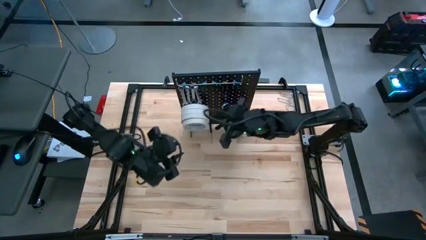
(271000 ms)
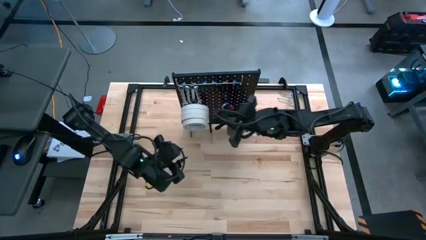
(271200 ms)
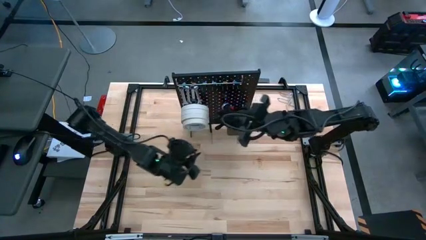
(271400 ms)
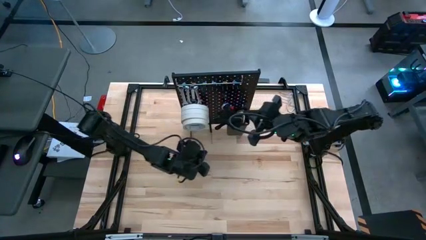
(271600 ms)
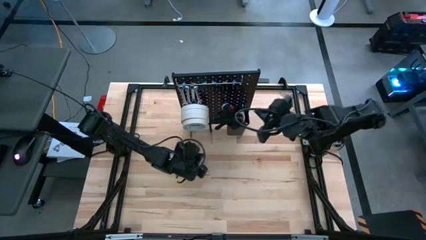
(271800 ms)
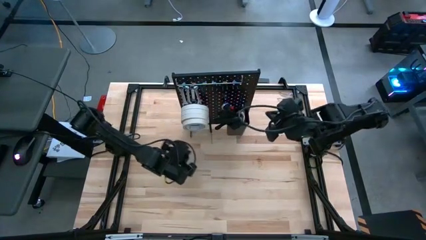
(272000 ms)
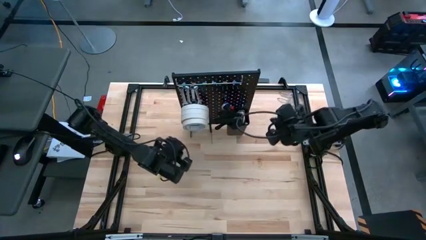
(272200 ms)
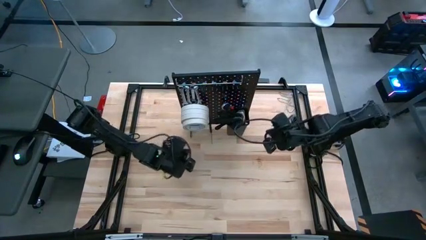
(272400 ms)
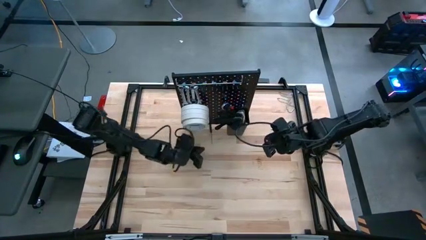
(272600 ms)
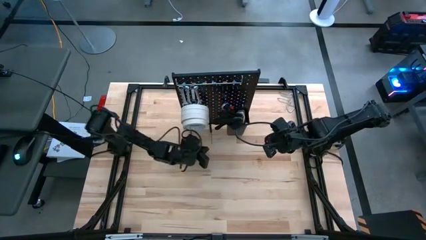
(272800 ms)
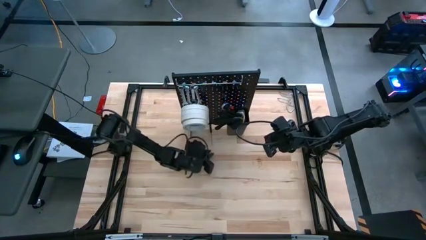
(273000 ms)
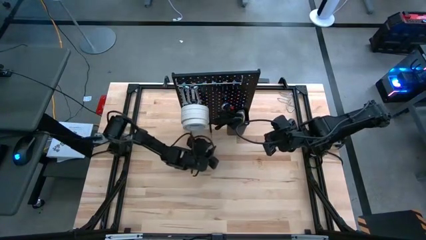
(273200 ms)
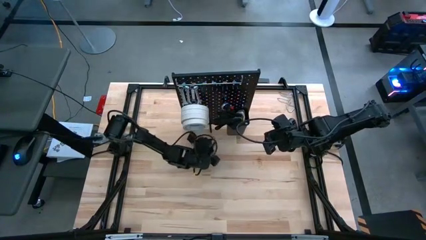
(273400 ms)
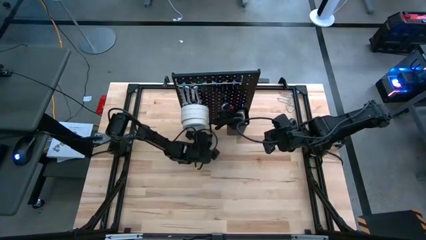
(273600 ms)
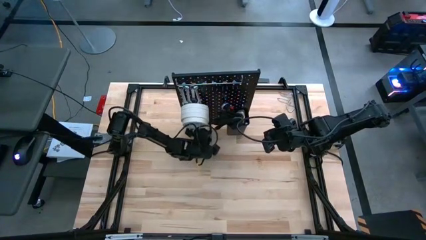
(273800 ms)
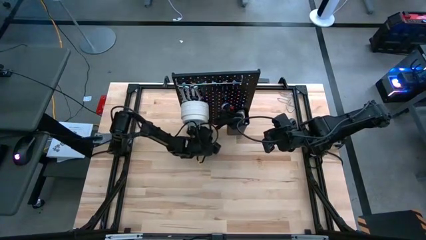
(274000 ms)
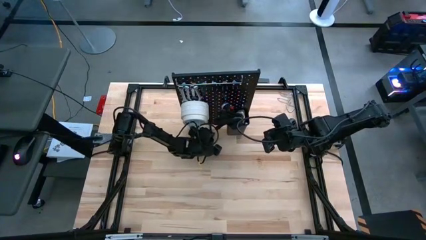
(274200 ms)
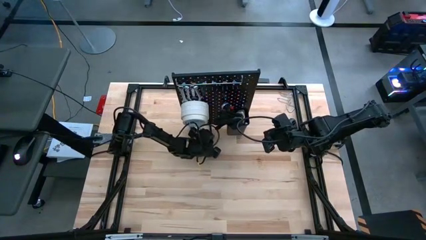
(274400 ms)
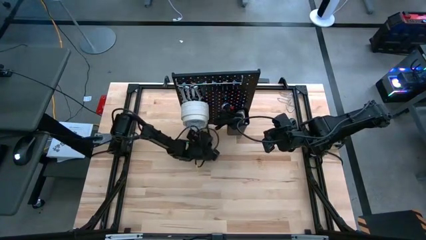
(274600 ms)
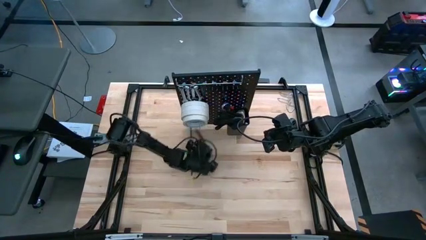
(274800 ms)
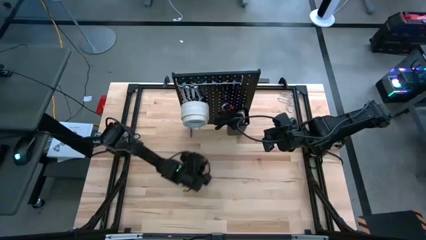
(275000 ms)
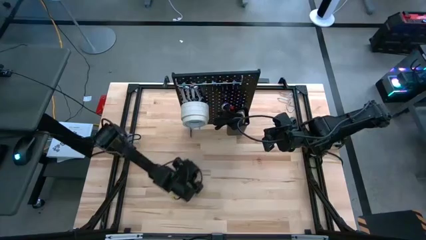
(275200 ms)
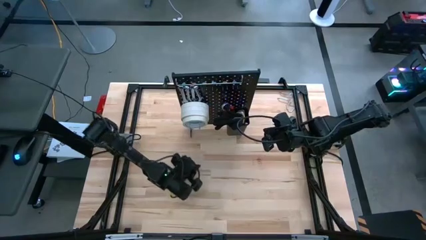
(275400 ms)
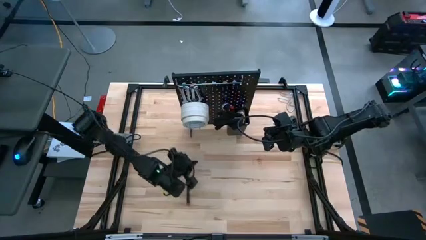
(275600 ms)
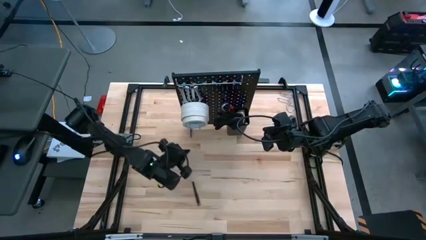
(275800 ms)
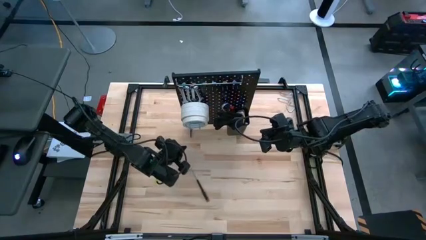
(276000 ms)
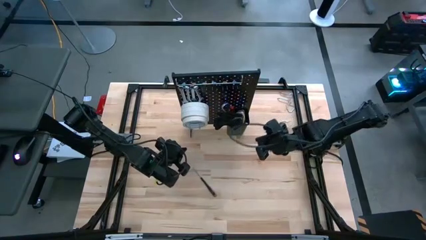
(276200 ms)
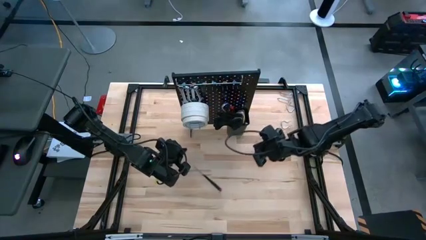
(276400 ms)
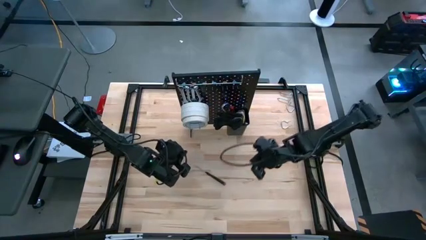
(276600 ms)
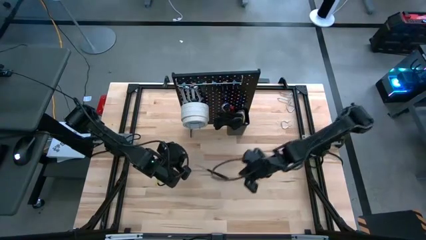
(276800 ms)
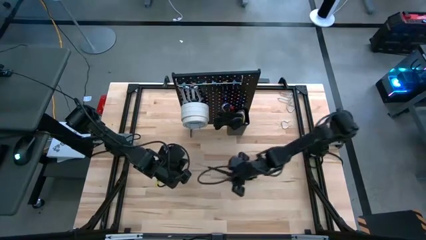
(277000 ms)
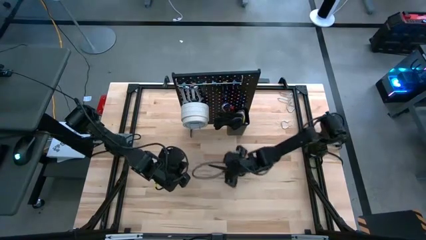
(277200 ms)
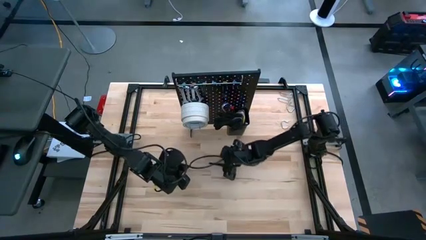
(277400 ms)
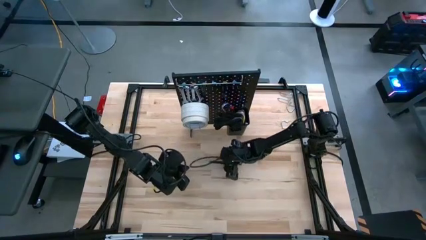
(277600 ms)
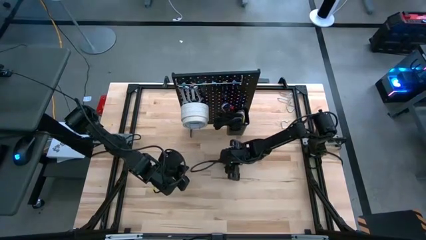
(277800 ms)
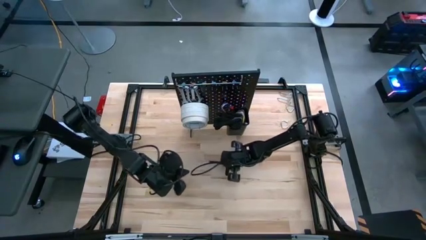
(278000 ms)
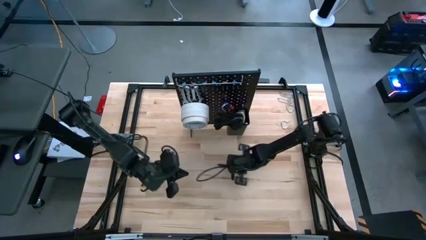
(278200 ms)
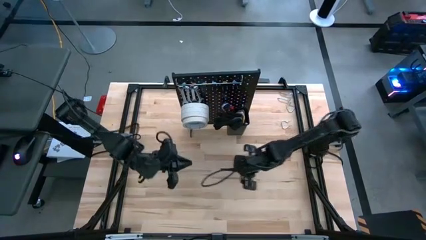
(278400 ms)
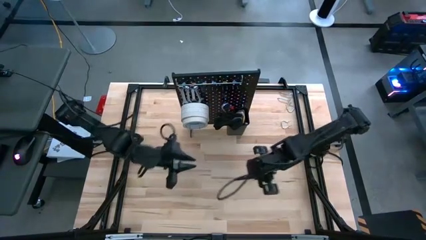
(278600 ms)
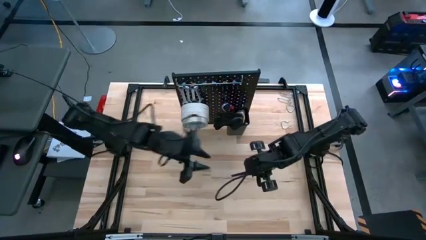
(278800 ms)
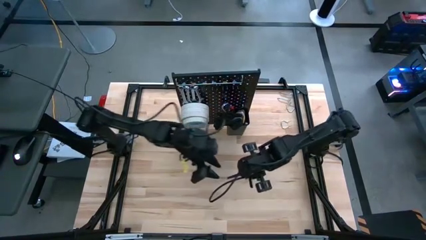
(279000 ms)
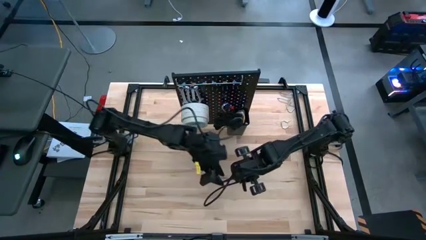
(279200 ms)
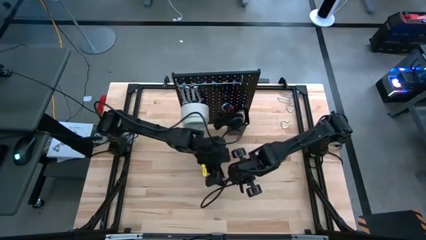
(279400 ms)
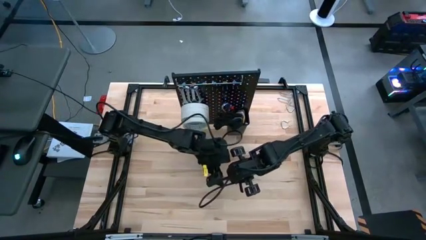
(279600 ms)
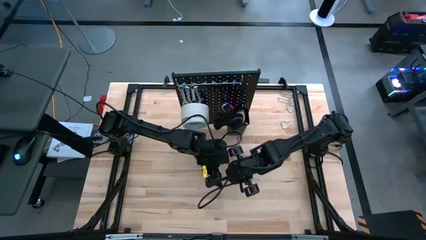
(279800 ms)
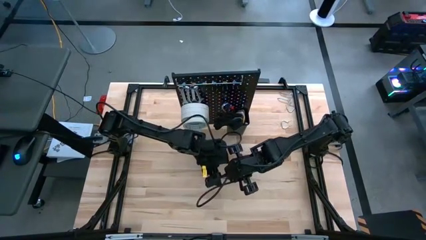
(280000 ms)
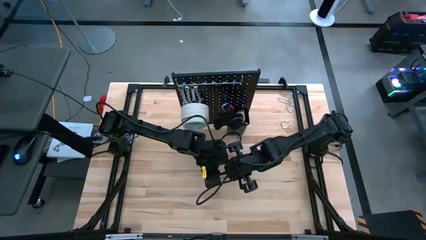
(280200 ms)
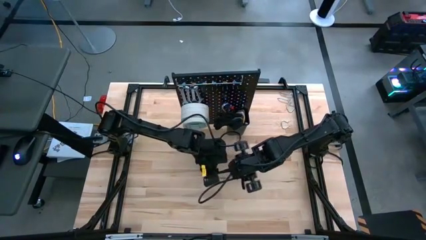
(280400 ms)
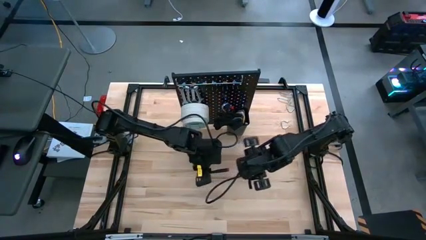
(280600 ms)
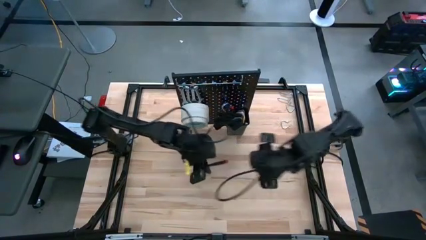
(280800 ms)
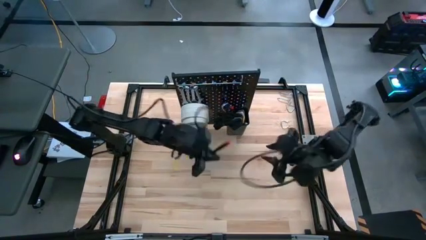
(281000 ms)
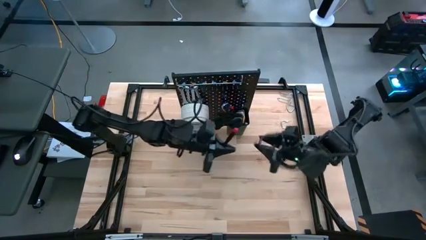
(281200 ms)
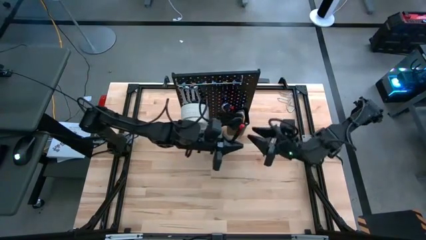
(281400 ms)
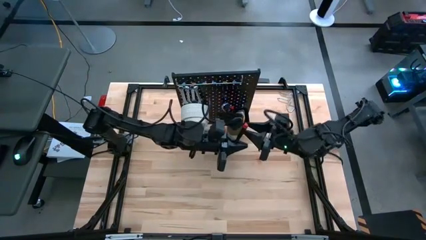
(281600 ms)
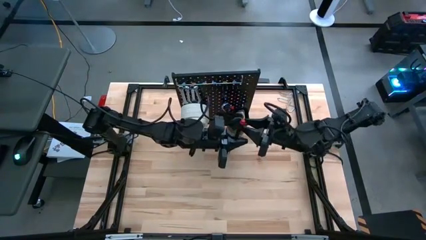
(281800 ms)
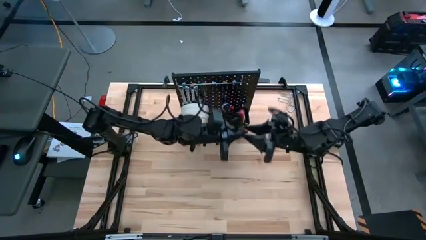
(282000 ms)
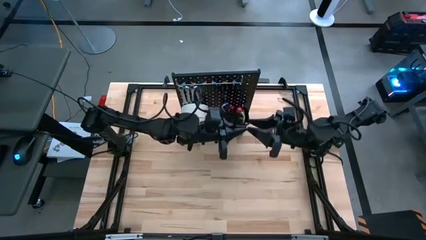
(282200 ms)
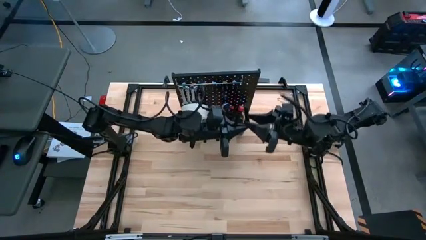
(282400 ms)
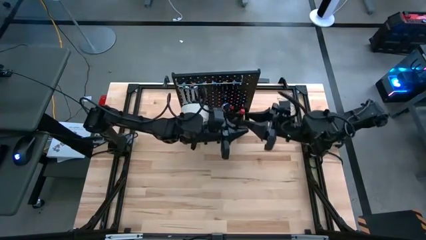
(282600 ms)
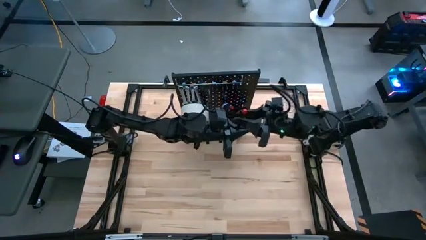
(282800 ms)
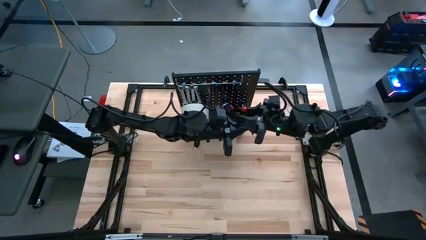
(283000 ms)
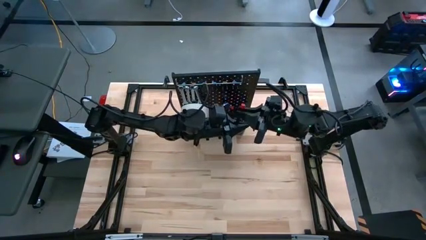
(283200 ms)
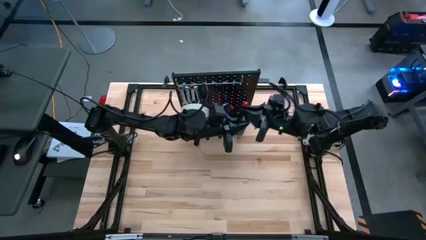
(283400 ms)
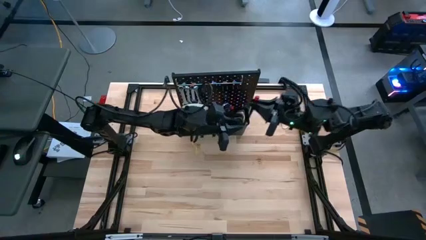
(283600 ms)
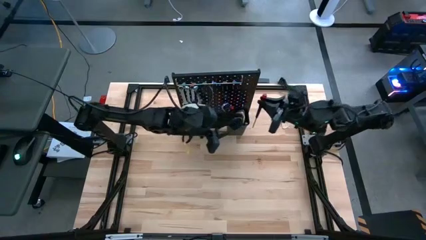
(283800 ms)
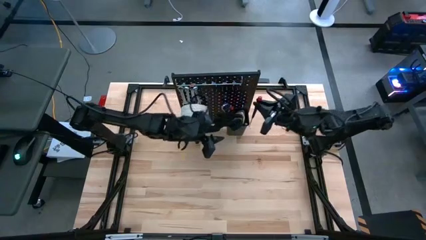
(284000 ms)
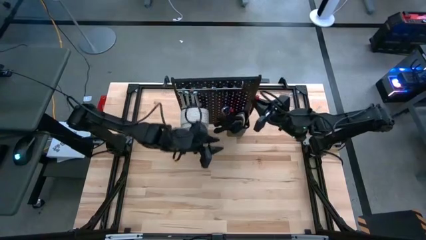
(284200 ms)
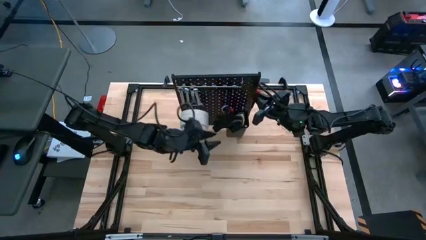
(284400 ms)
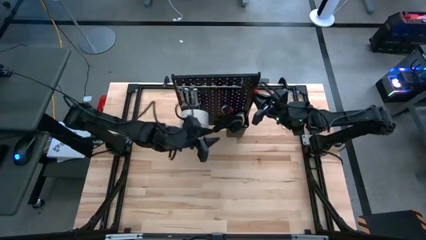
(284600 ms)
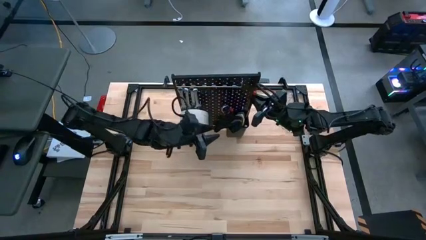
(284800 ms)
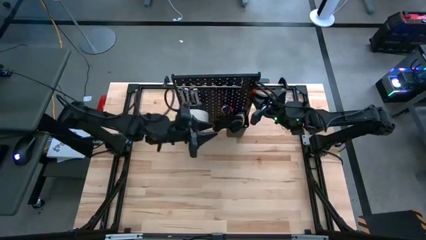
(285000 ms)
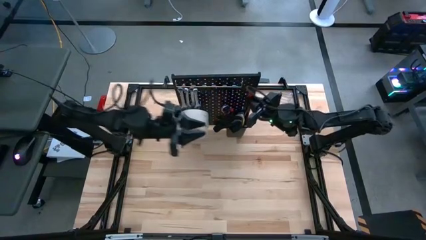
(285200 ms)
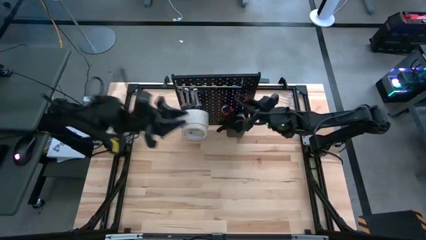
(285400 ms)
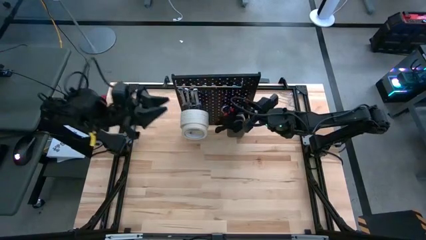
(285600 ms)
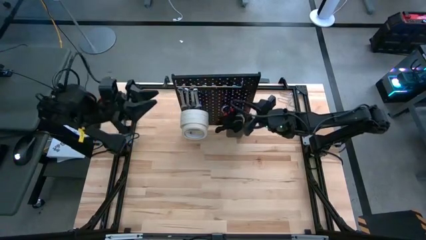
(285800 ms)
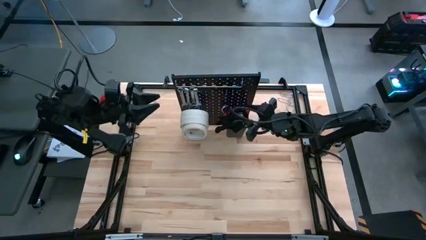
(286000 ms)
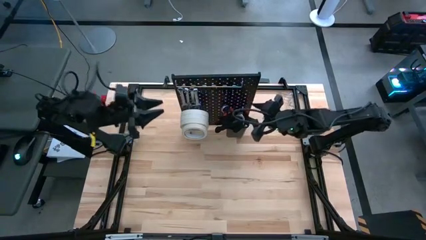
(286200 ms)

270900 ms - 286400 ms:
Task: Hang tools onto peg board
Hang the screw tool onto the pegboard
